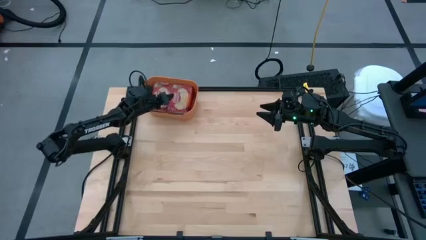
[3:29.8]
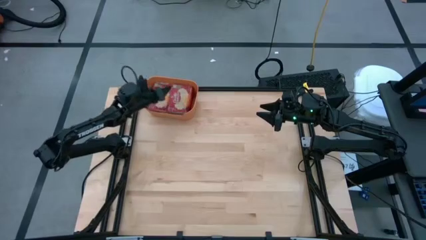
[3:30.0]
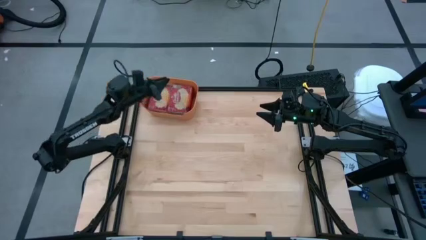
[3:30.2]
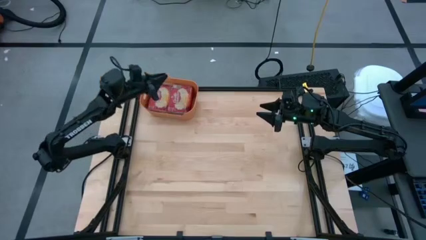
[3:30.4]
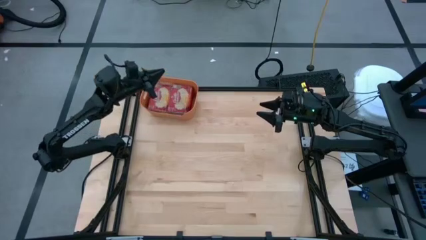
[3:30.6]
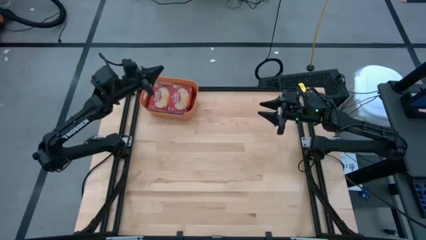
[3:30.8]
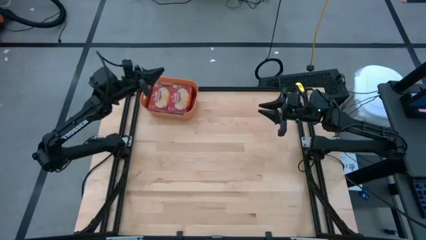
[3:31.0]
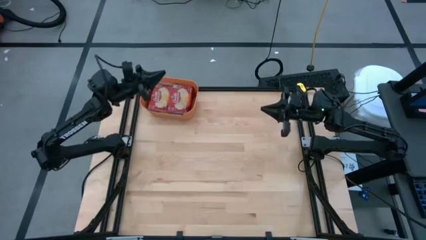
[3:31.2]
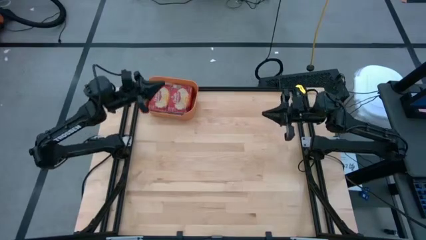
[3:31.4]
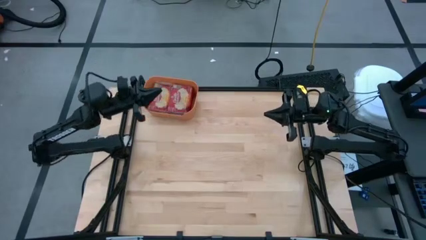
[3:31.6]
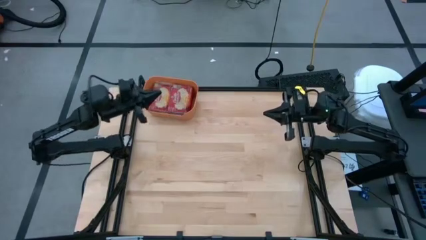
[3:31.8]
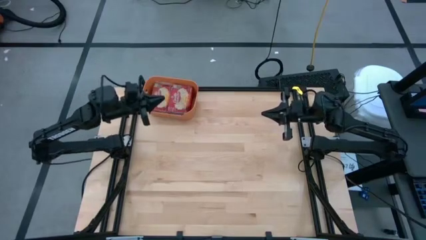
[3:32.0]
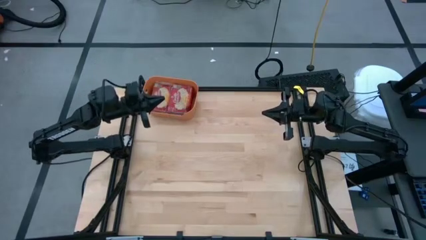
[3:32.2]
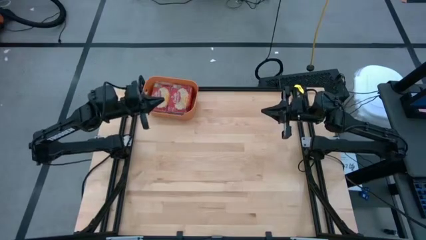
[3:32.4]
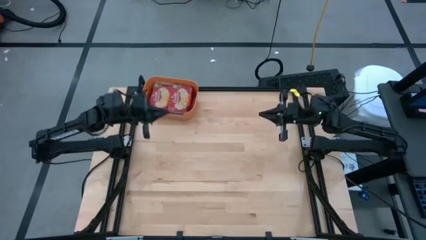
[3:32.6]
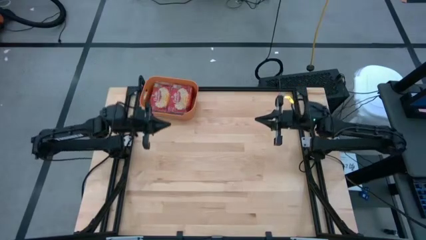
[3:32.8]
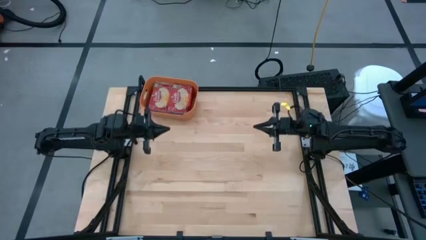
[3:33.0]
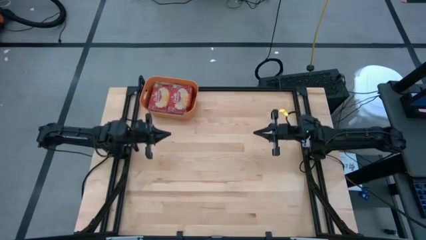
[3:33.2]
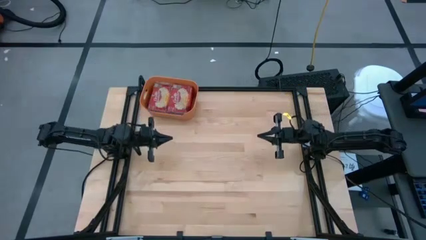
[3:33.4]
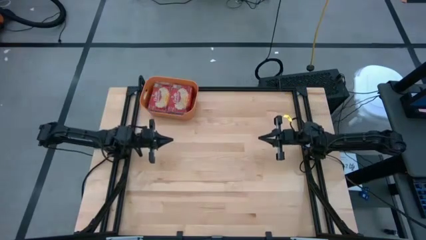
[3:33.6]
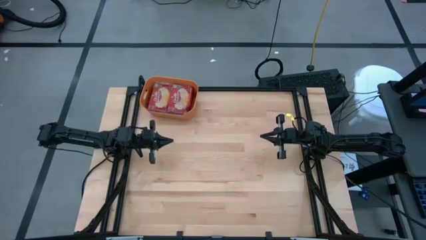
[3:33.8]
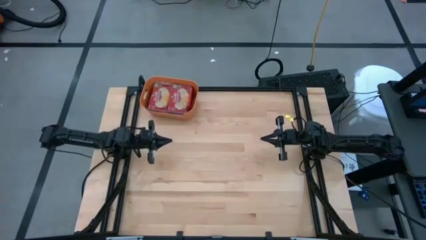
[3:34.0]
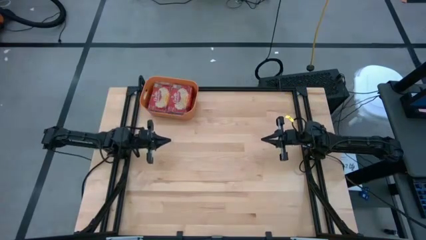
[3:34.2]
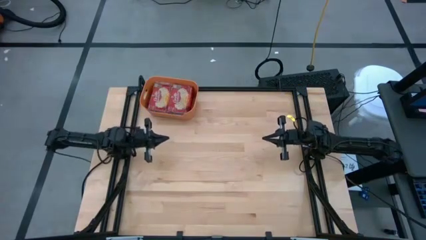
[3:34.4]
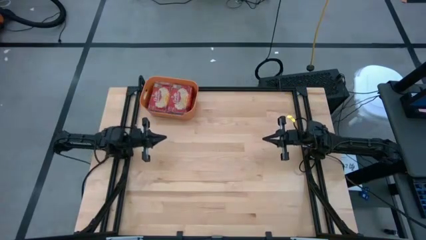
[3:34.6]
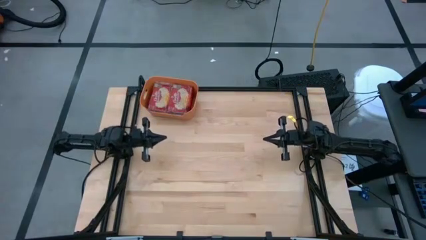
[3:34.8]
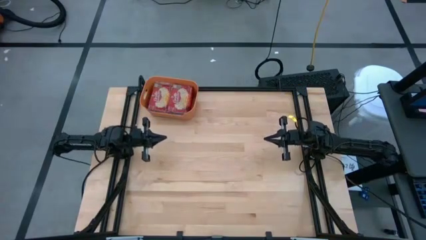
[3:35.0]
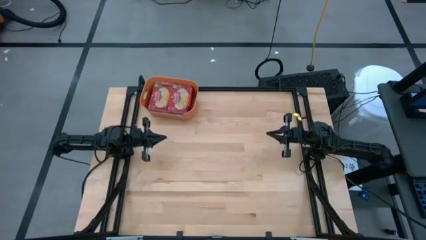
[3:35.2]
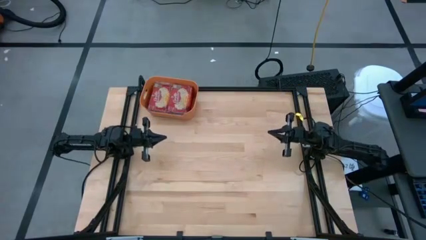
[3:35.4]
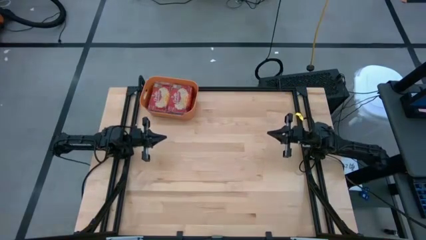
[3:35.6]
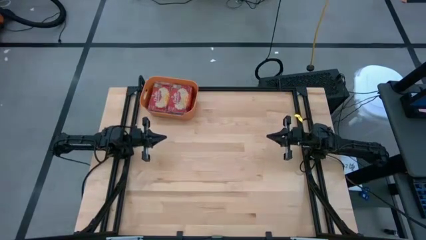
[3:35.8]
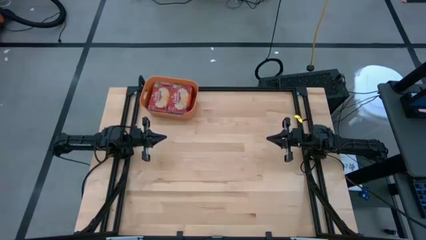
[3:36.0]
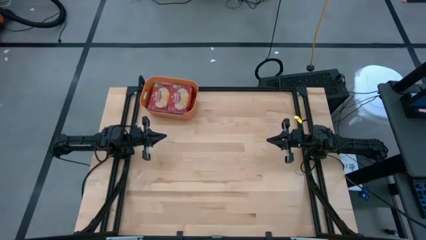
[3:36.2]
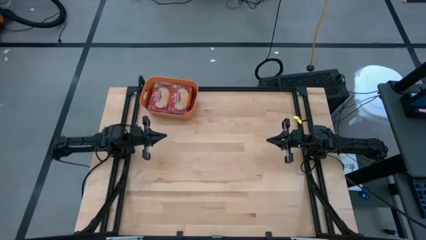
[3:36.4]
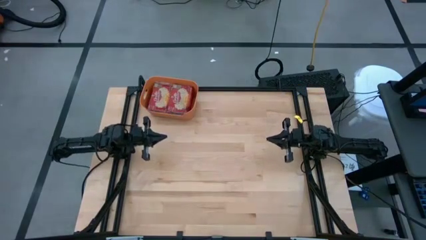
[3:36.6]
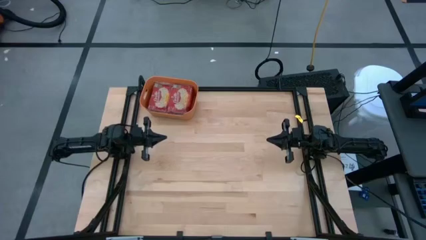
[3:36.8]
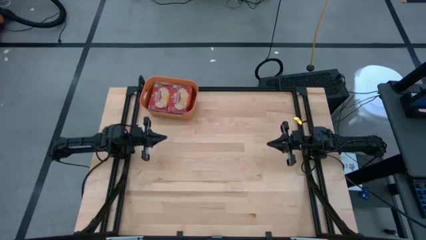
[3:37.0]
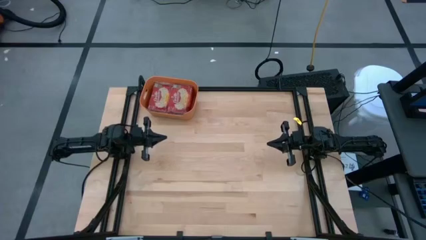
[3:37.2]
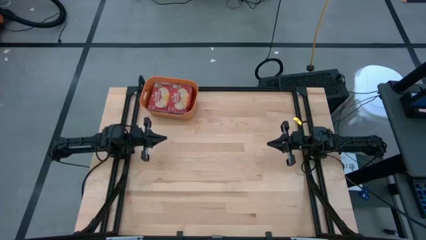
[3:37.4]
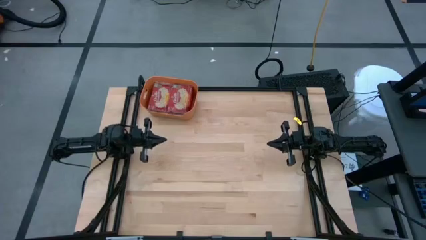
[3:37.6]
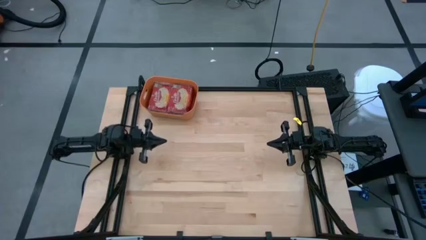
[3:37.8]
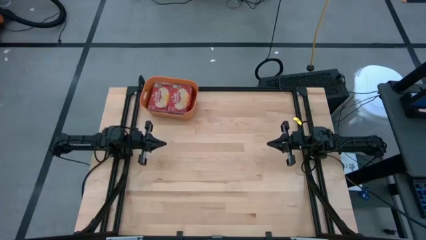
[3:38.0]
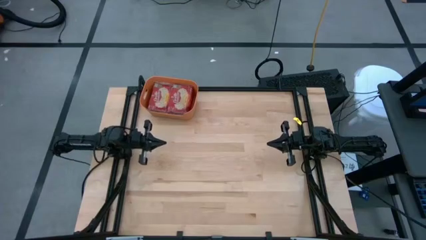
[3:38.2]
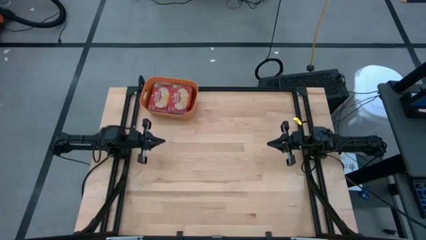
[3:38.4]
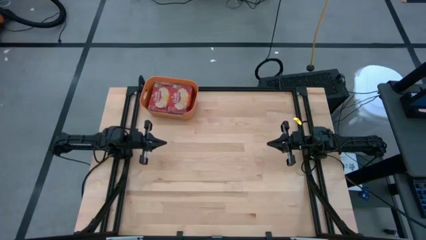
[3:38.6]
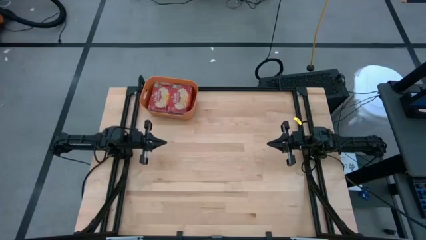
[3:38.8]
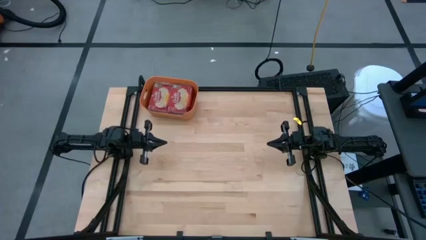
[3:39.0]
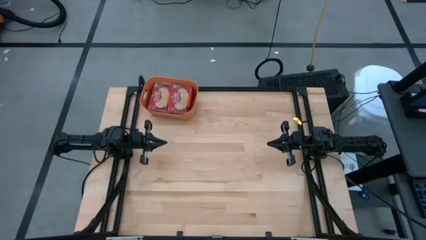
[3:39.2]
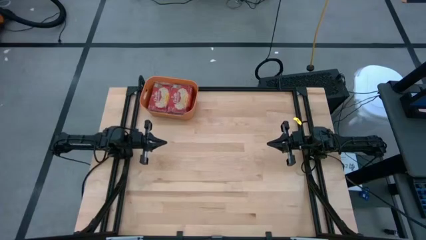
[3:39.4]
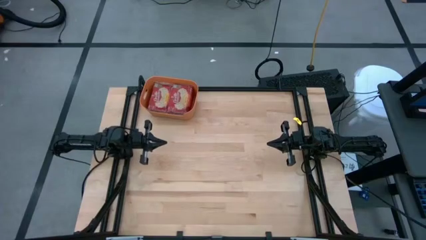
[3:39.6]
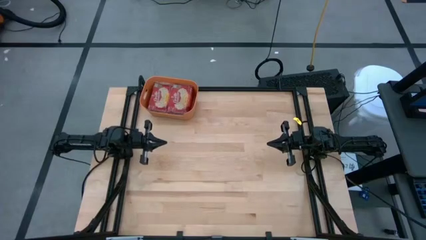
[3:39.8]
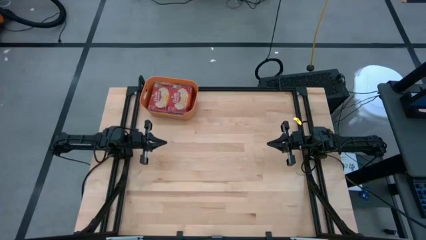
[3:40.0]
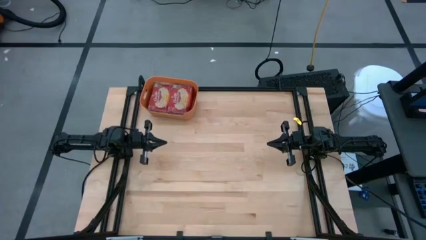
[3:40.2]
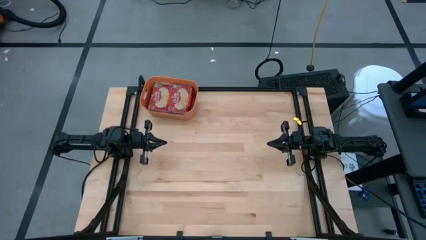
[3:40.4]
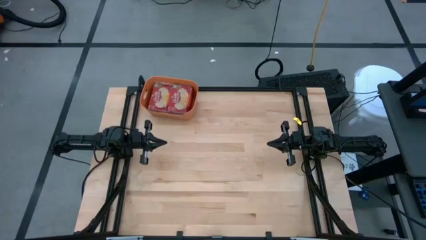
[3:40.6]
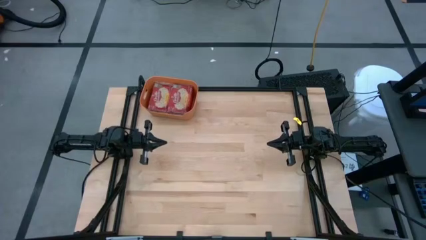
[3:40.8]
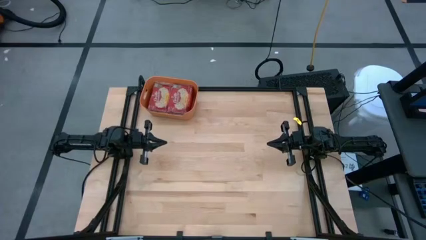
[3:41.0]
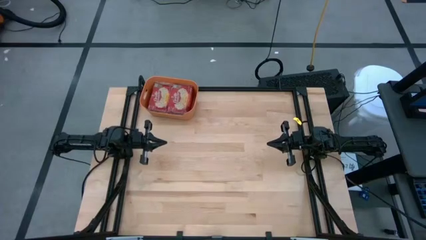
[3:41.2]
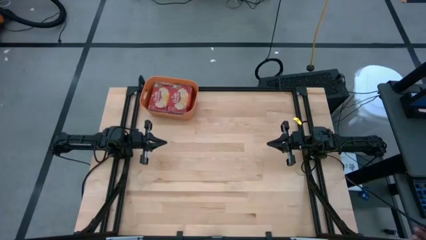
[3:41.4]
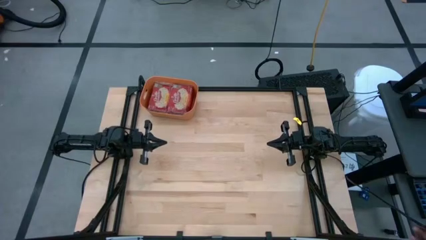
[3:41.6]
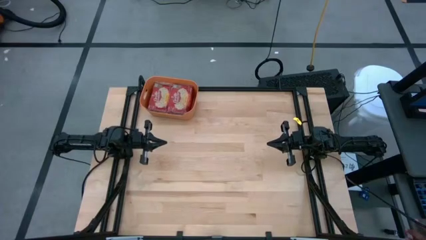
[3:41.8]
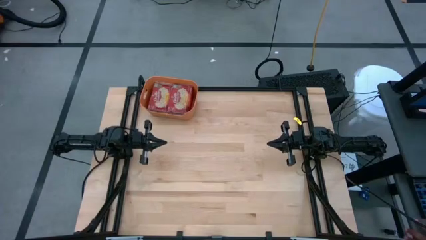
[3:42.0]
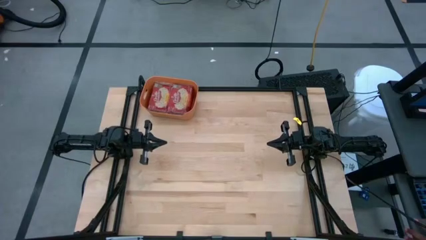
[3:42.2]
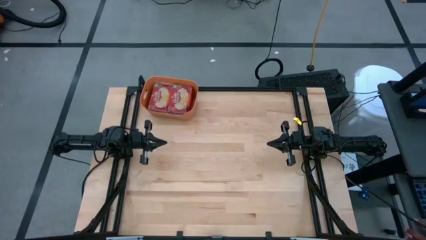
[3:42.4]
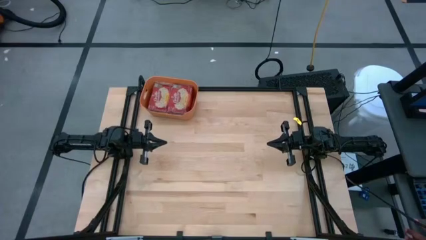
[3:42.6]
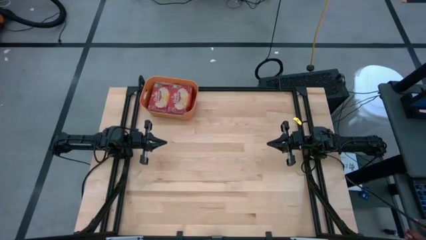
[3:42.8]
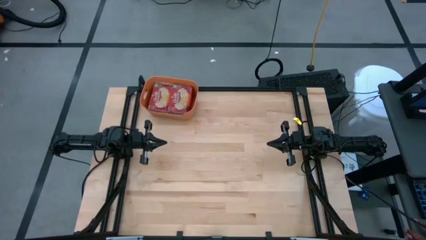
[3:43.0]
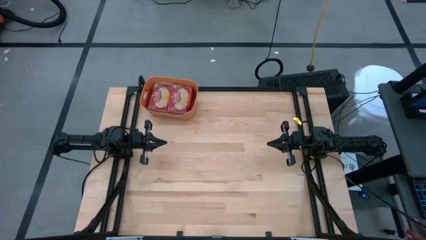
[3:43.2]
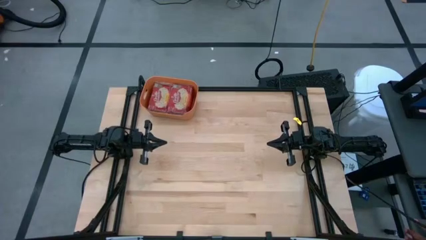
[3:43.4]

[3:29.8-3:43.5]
Task: Sort popcorn bags into baskets
Return to Home Position
